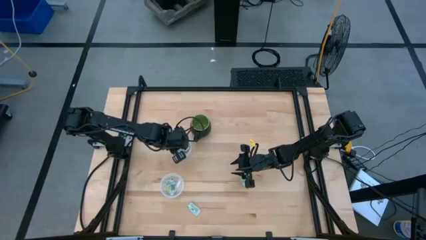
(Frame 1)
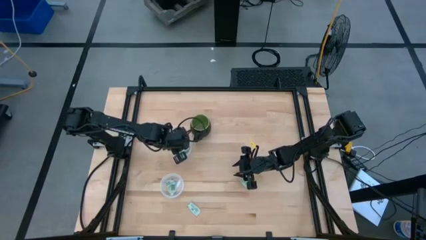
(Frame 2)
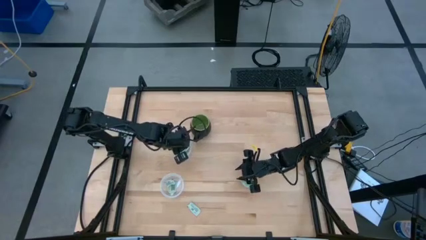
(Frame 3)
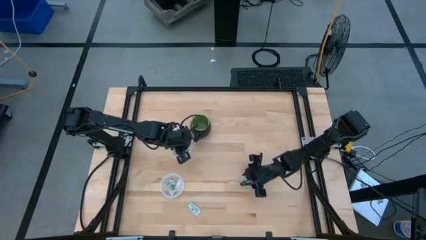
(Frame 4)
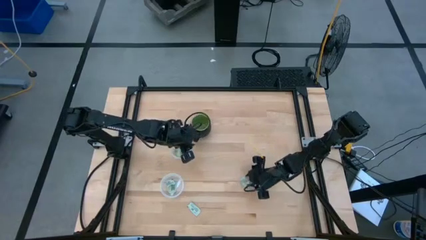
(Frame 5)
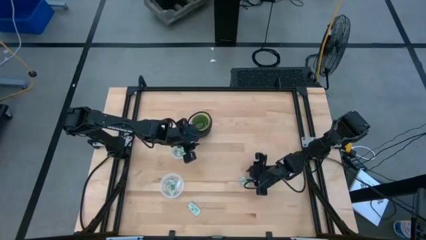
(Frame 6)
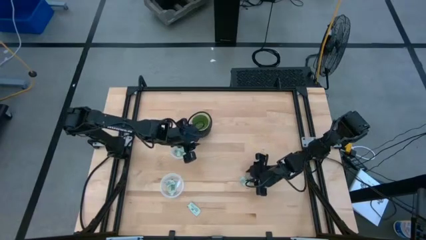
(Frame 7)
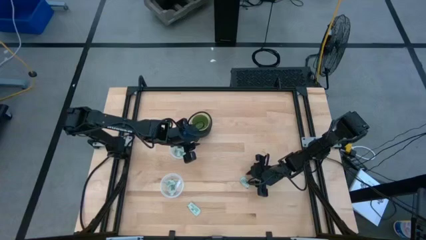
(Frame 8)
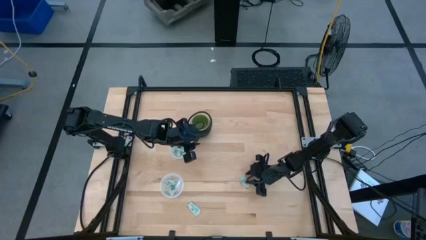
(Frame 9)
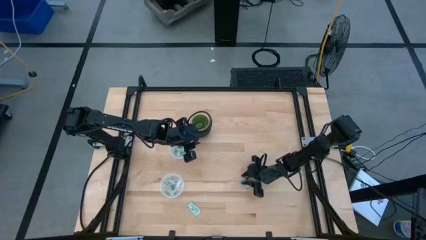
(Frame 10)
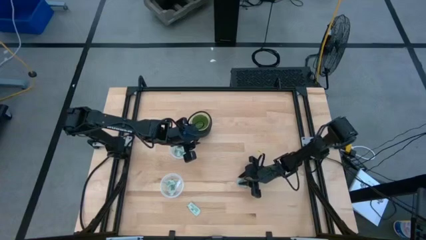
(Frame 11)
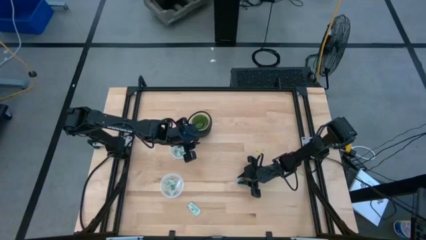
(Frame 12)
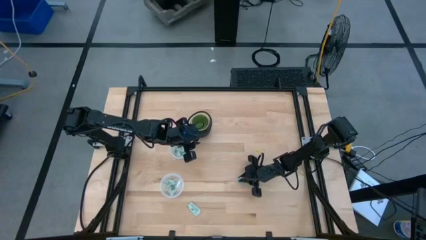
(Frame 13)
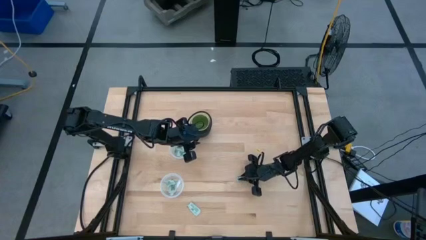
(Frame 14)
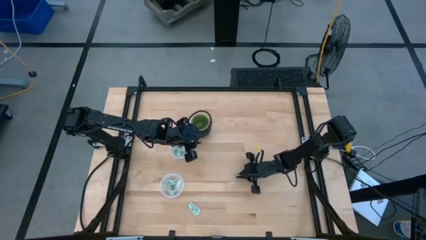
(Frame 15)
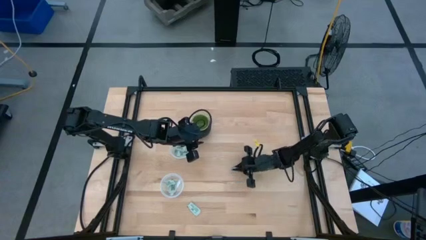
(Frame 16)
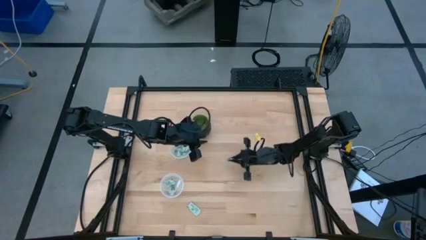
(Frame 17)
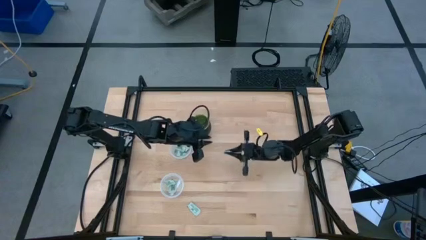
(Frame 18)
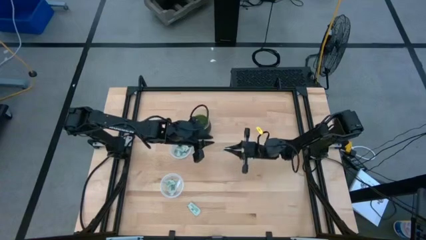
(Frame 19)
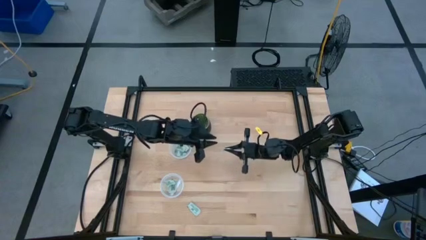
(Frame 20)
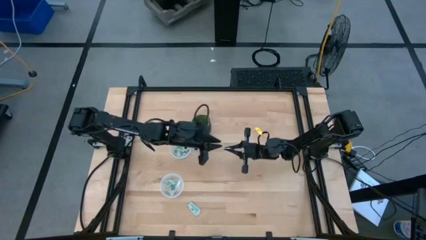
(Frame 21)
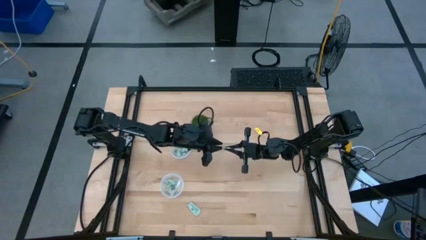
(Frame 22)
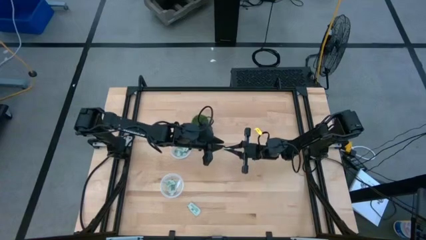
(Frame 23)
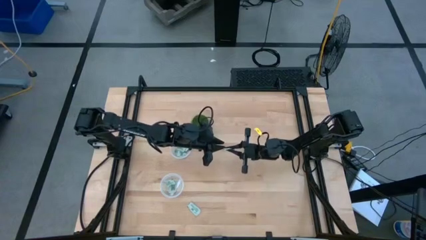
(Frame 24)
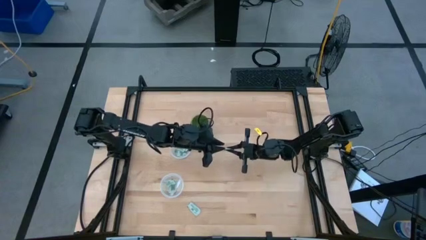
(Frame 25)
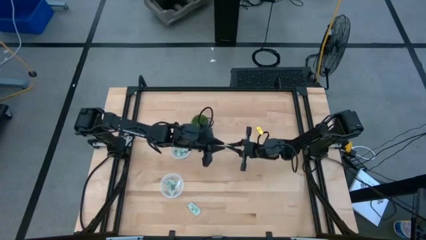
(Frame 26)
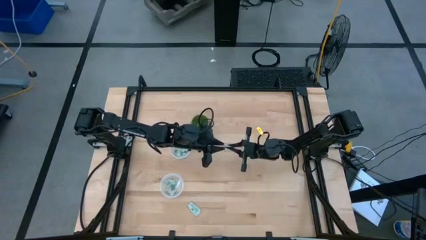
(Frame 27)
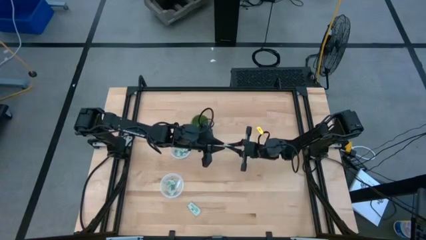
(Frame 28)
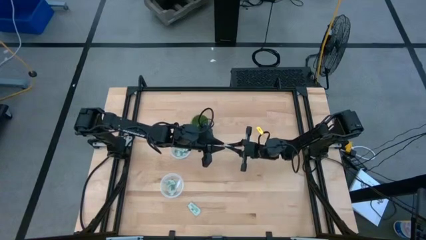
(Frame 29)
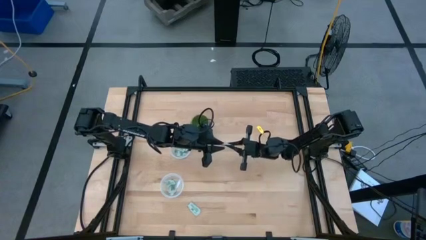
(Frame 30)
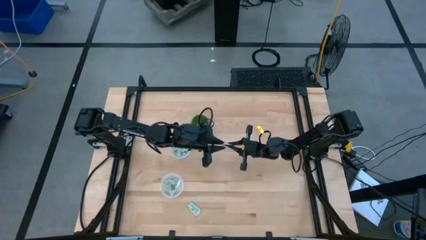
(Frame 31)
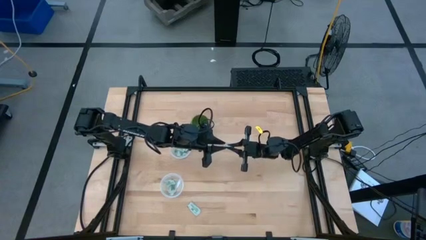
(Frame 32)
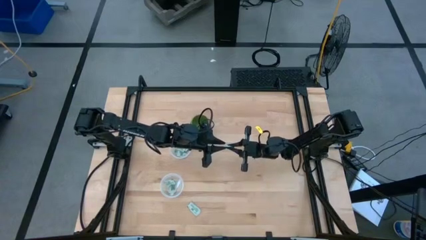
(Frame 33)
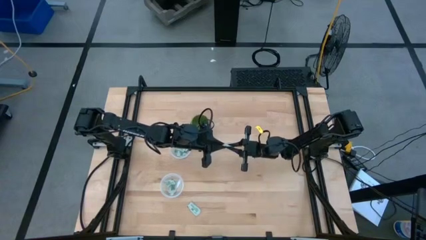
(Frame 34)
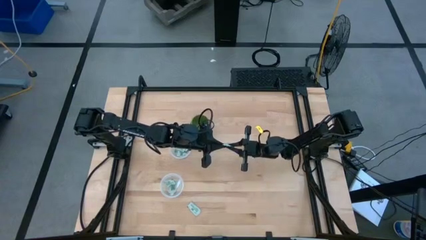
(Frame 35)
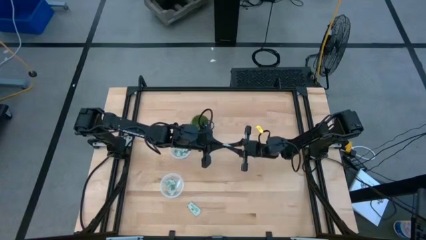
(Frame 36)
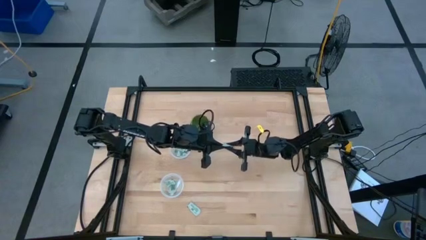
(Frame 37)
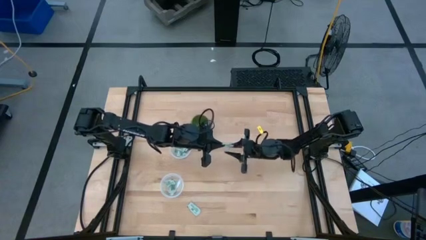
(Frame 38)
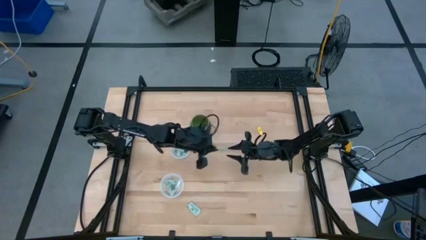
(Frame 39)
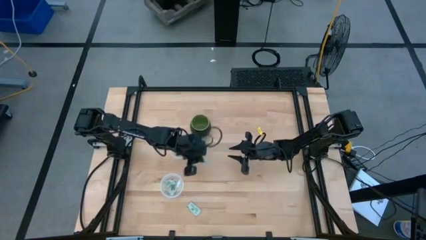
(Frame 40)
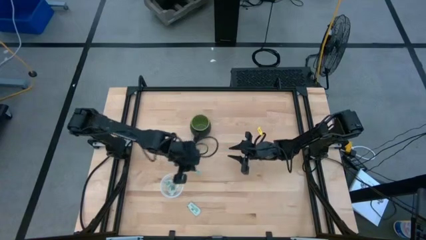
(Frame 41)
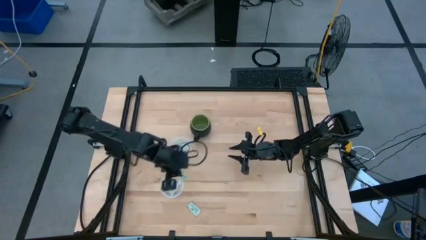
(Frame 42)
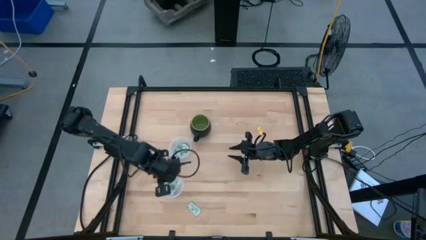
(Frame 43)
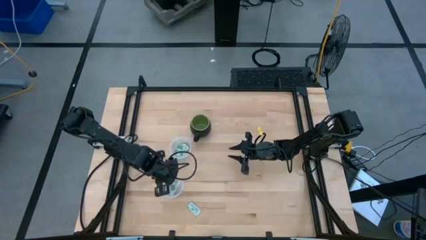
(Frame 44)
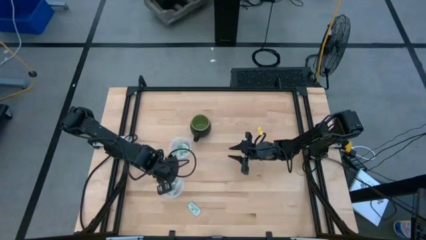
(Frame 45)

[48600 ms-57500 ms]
Task: Pick and place Stevia / Truvia into bins
Put the green stevia packet into the bottom transparent container

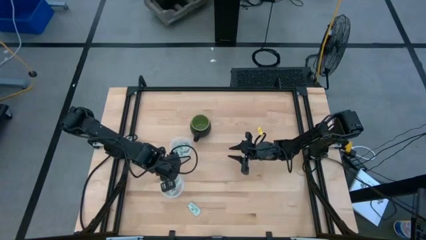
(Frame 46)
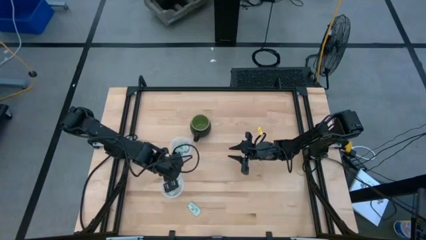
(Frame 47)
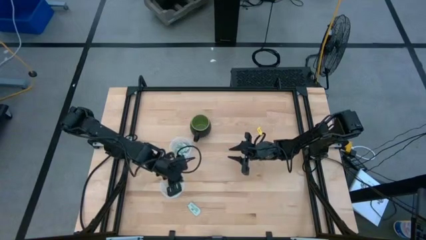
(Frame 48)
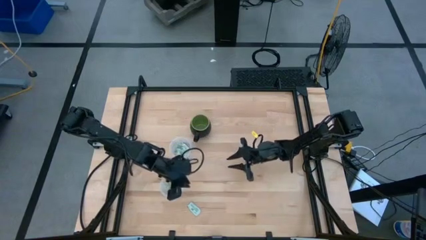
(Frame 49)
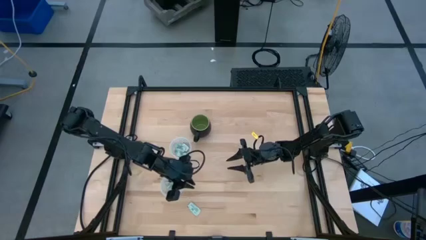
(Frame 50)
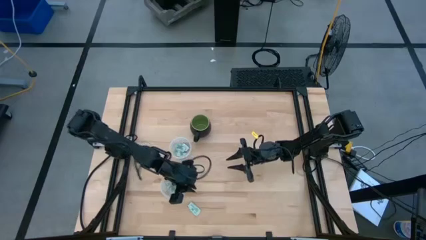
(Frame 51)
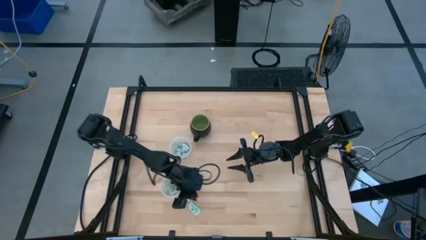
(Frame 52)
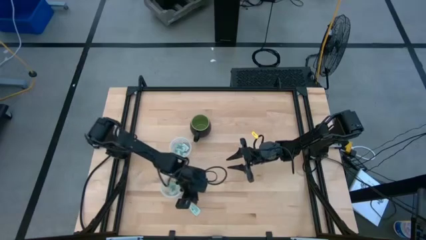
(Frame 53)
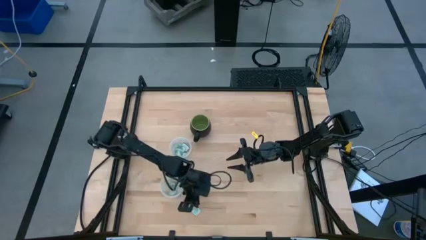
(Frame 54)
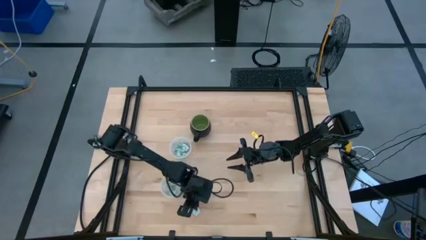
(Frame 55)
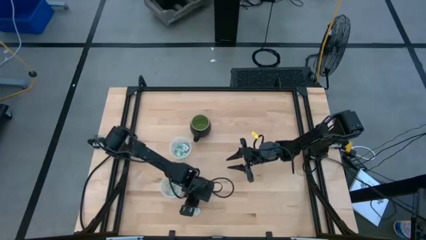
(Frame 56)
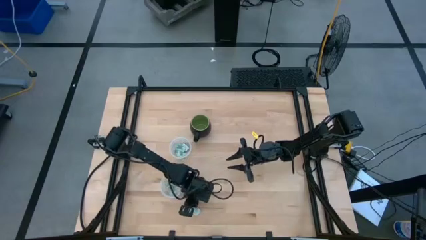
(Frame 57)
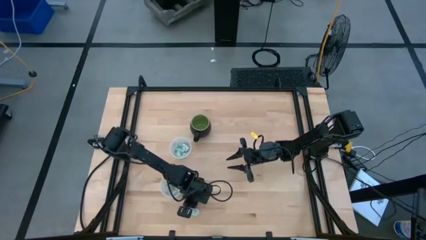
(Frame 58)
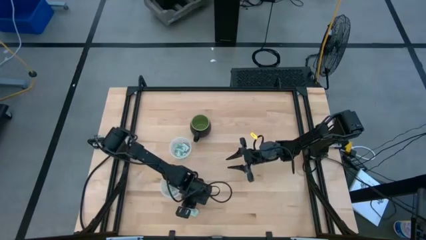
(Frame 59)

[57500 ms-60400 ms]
Put the green stevia packet into the bottom transparent container

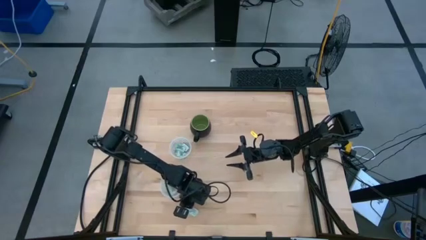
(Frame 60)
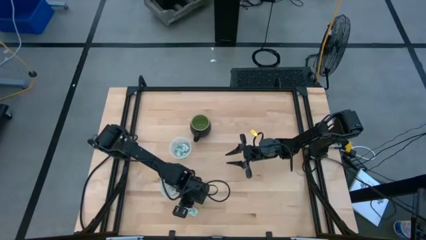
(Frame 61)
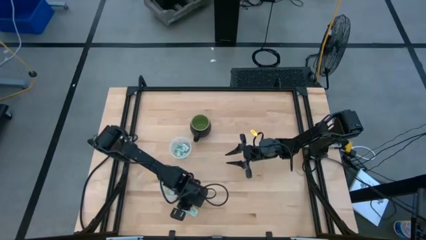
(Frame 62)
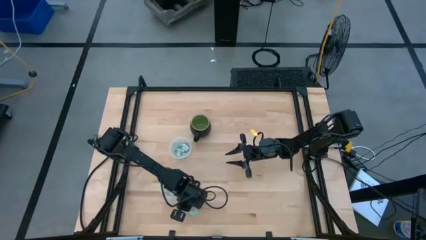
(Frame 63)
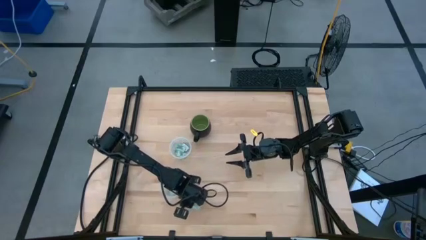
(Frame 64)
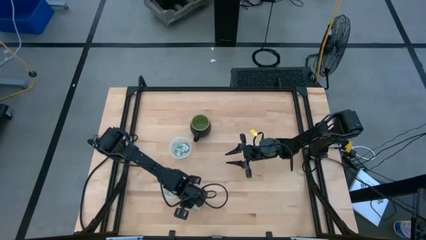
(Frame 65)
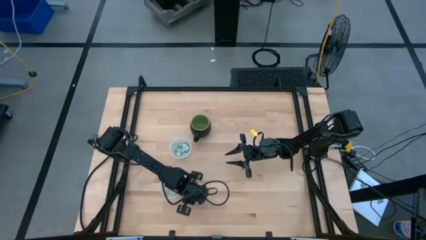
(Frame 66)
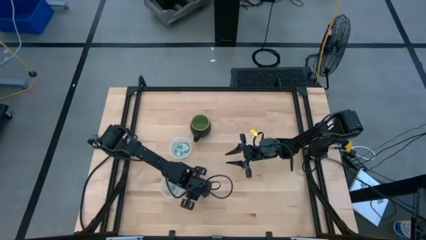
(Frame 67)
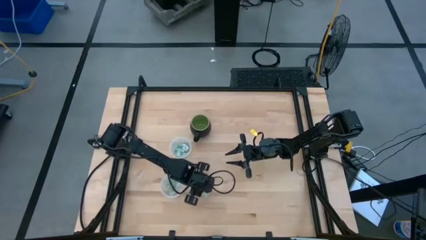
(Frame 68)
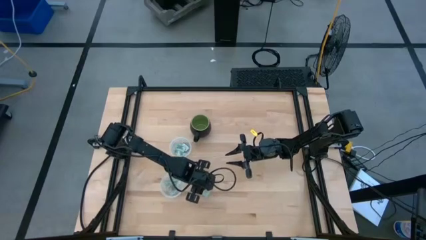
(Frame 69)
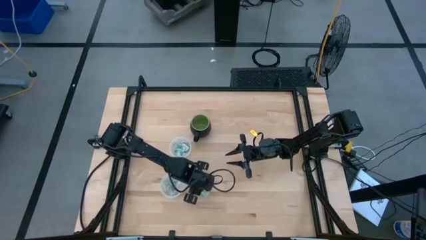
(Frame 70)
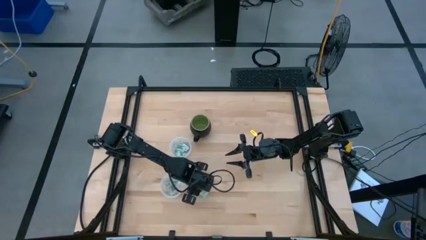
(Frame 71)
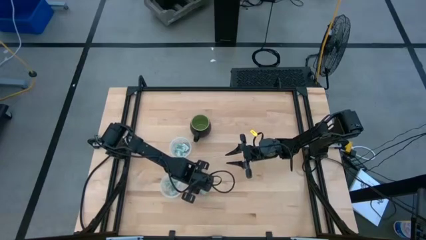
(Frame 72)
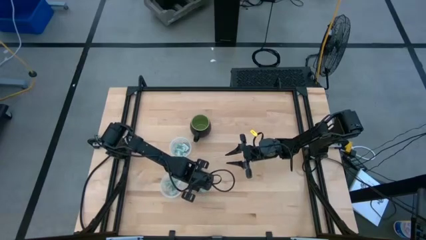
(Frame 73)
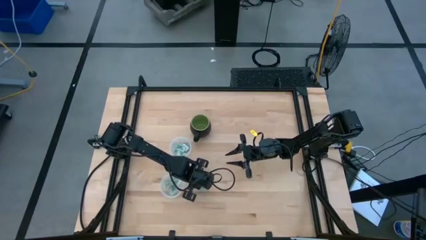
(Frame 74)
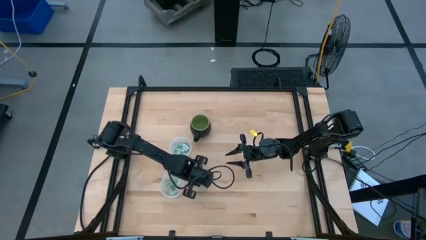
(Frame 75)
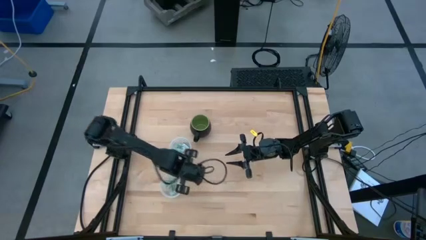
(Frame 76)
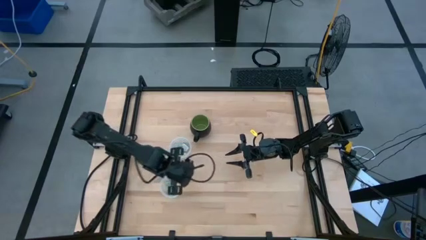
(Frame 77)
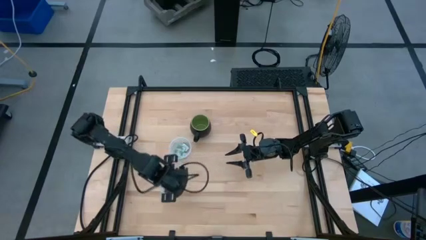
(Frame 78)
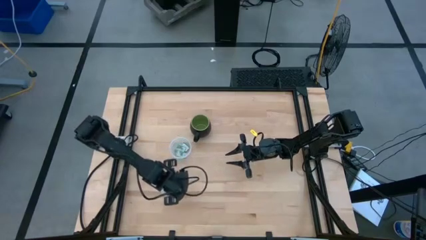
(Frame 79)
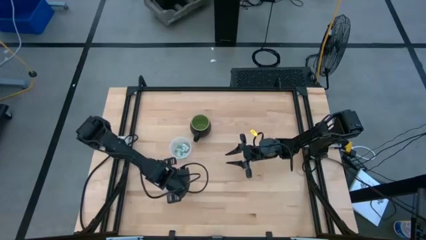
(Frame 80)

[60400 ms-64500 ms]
Put the green stevia packet into the bottom transparent container
